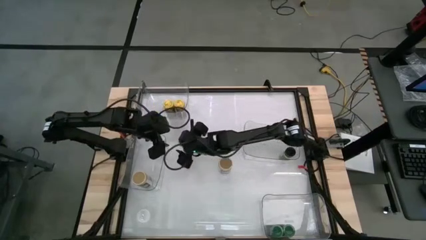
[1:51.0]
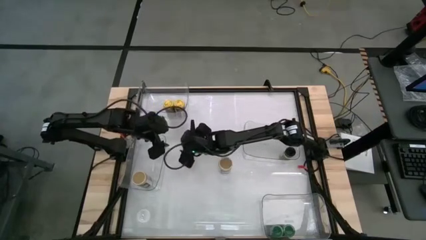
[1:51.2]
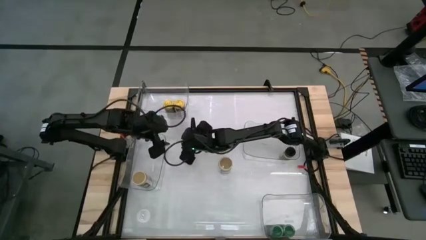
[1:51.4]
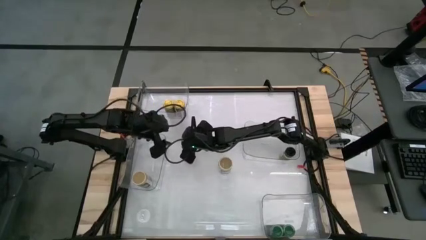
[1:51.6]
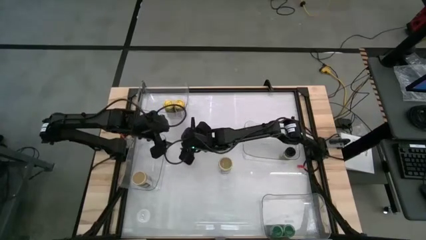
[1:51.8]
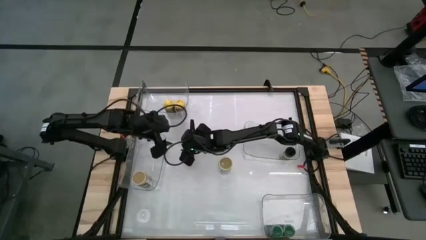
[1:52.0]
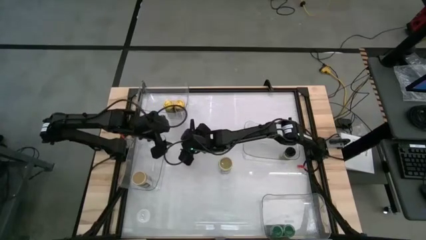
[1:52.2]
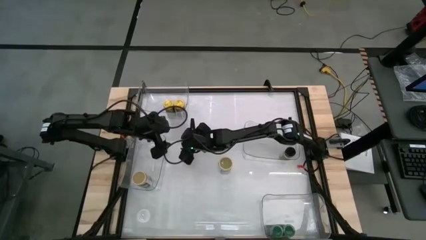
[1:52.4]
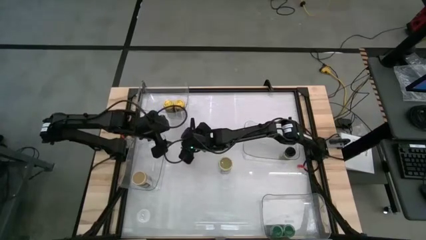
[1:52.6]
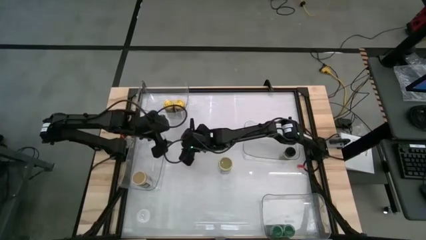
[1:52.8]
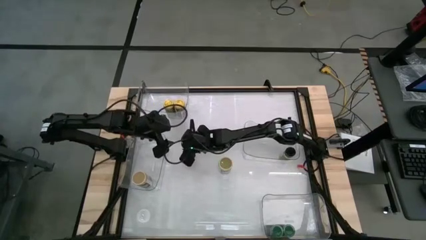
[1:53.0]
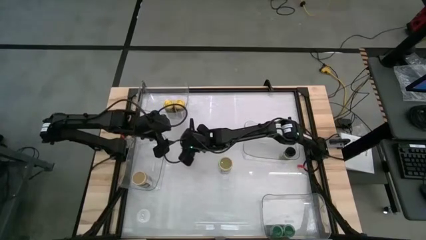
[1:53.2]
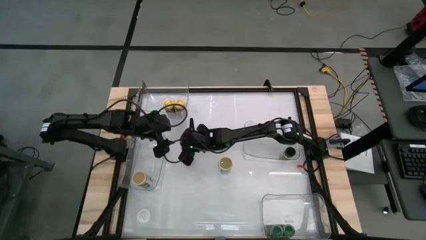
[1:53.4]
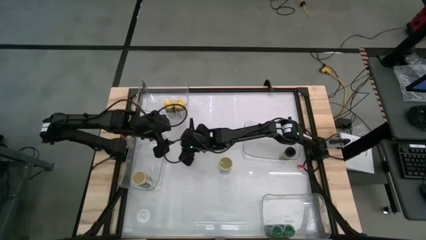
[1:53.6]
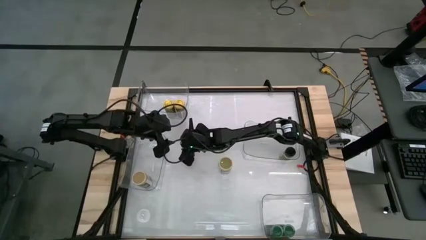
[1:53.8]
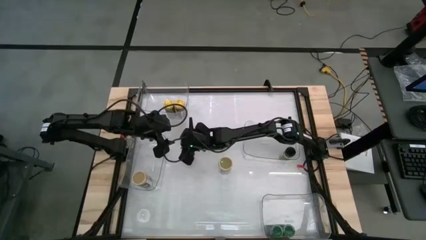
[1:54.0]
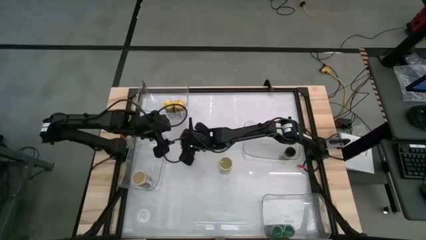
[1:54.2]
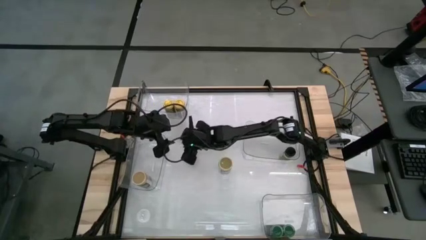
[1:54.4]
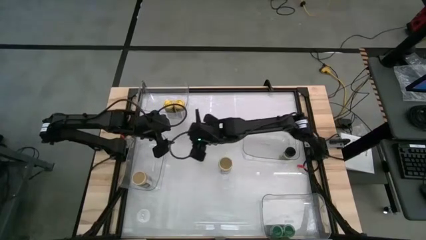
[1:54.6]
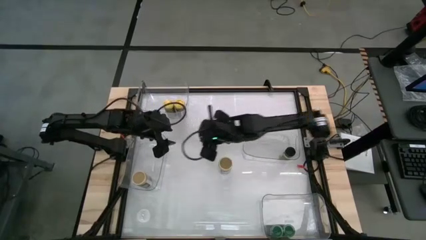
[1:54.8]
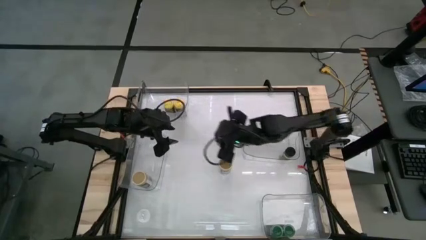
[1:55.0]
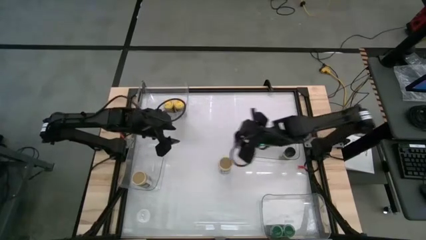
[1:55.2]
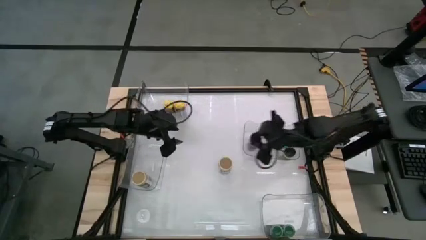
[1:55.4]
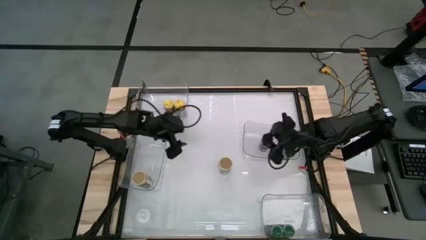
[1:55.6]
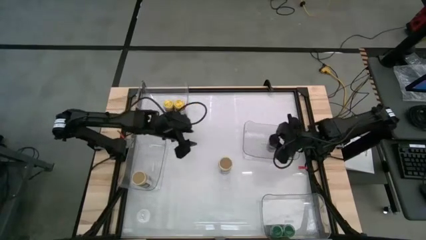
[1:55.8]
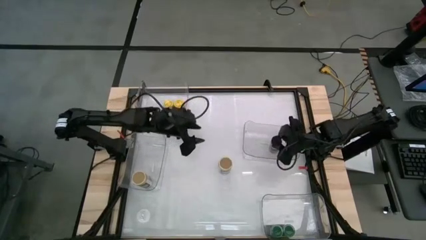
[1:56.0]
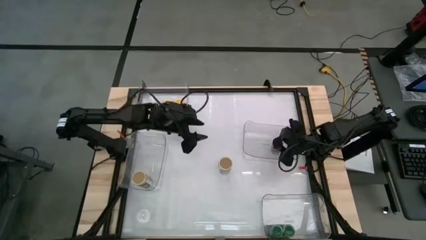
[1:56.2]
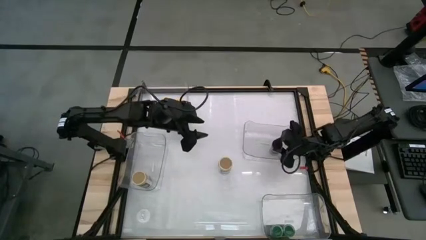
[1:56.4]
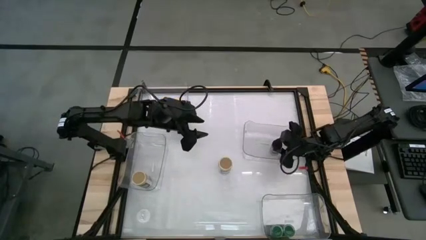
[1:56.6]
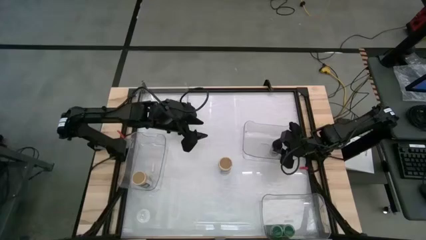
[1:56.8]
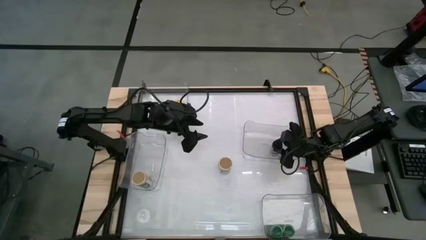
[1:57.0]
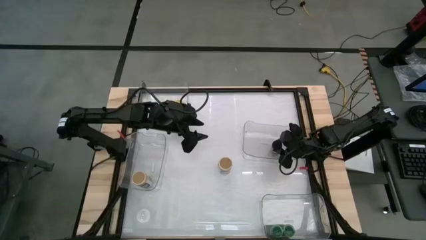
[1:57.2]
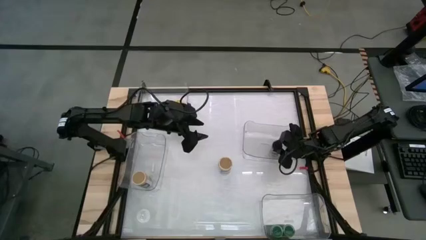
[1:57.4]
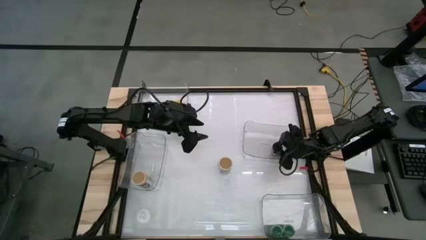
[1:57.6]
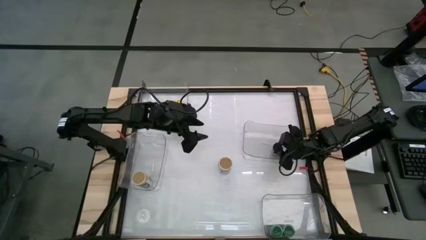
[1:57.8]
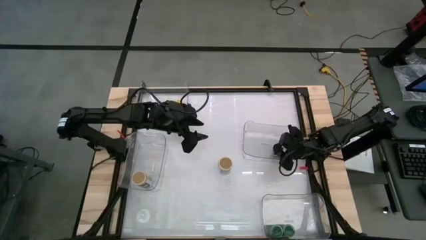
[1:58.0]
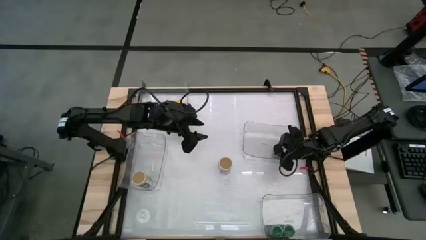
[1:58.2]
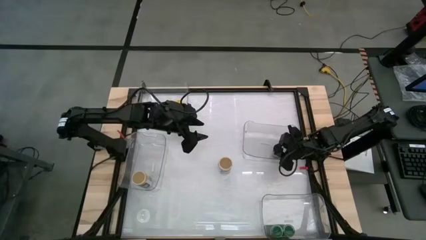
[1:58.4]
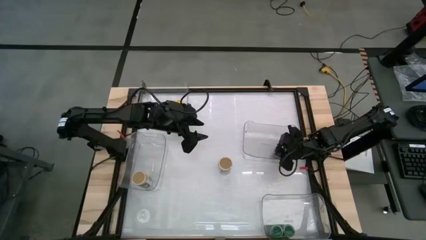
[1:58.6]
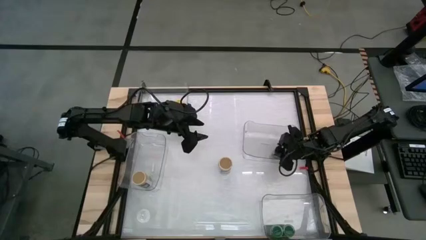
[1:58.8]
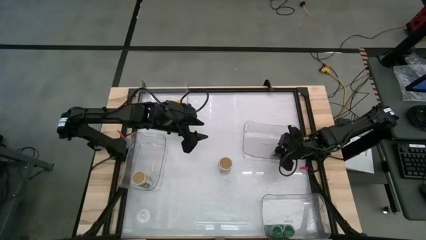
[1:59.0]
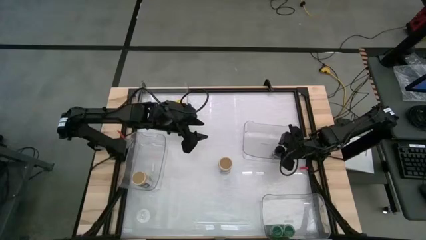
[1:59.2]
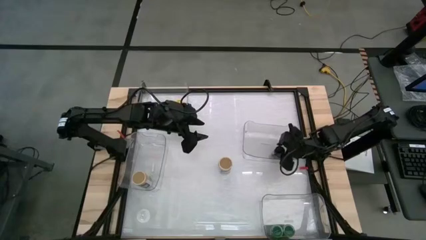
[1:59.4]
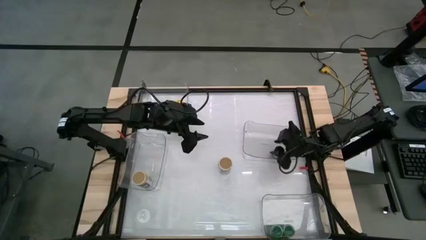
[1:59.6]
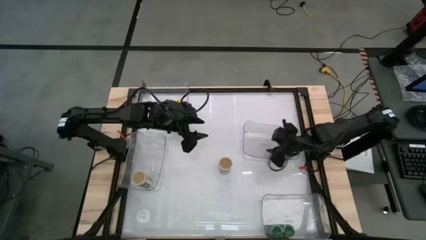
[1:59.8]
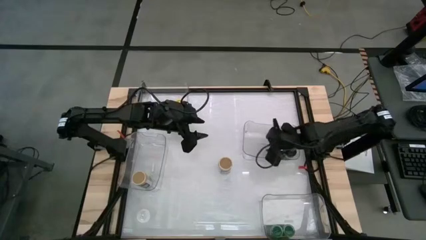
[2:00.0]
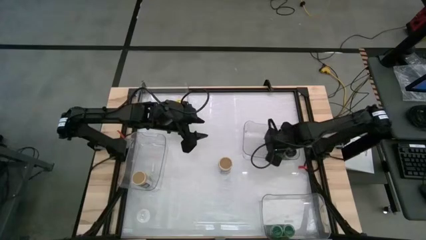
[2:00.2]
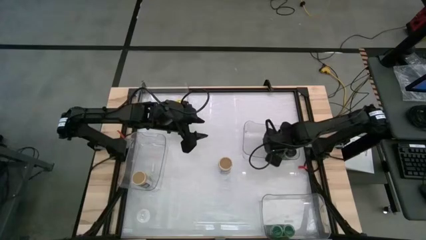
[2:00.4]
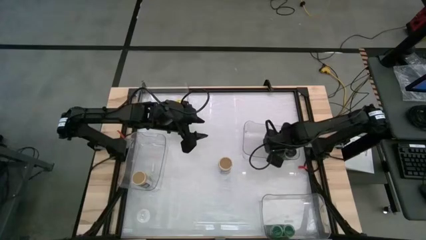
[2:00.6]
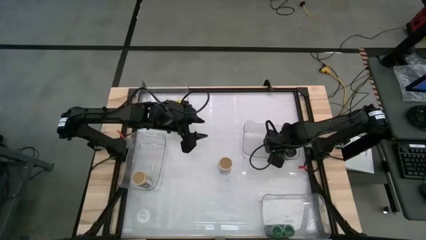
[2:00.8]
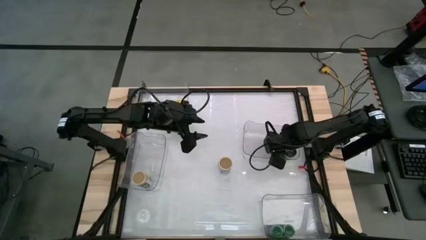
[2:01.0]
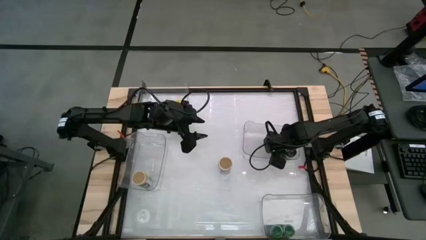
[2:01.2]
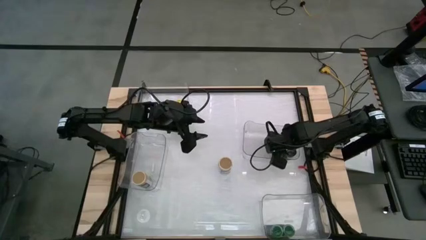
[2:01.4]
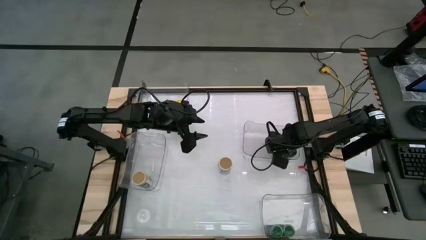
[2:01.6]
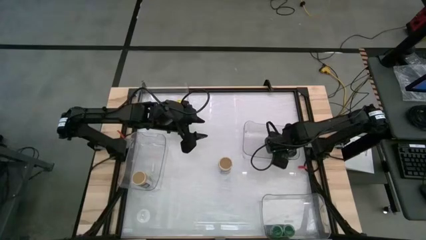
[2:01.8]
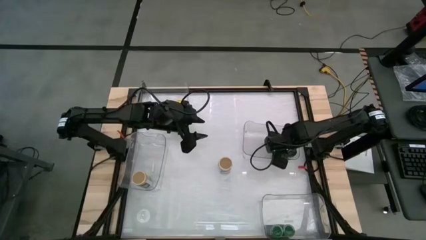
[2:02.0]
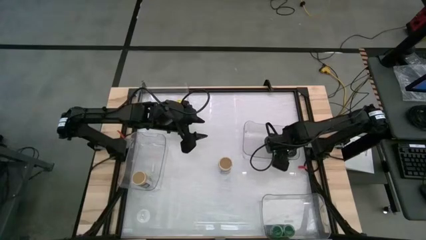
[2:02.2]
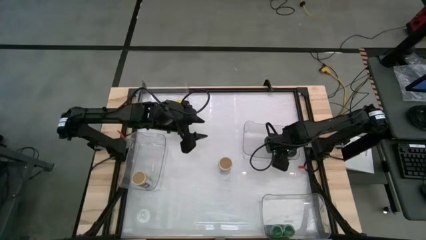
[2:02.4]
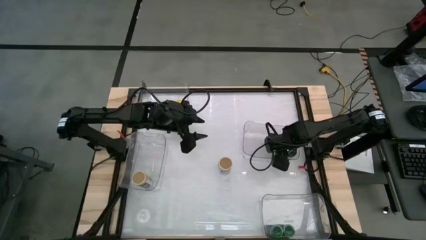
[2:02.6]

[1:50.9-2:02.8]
Task: Sort spices by type
Put the black seasoning bottle into the middle right transparent bin
